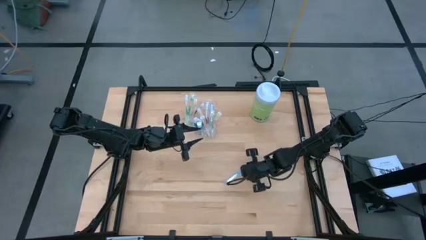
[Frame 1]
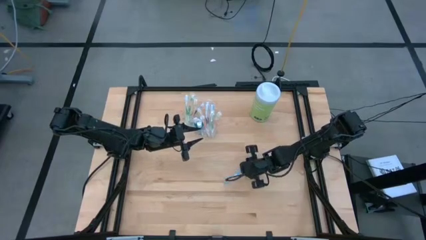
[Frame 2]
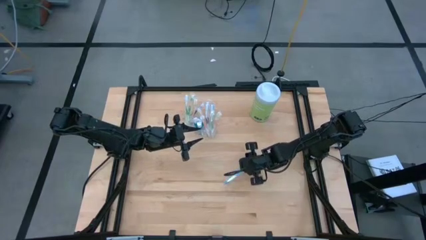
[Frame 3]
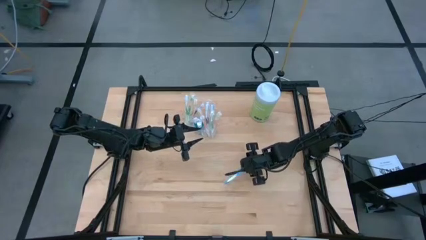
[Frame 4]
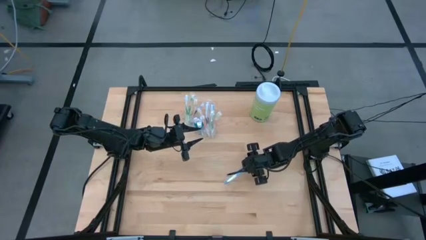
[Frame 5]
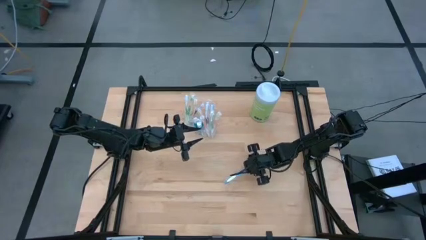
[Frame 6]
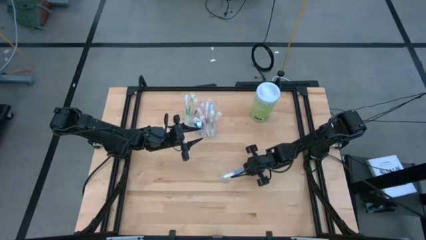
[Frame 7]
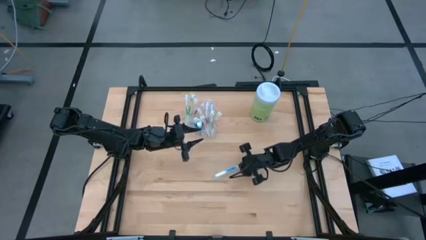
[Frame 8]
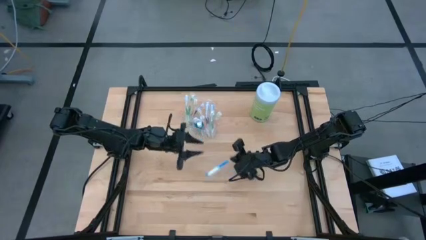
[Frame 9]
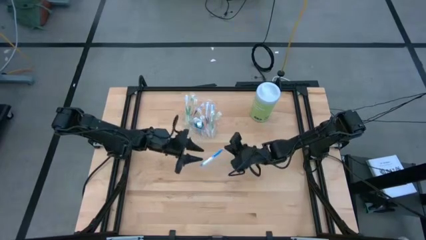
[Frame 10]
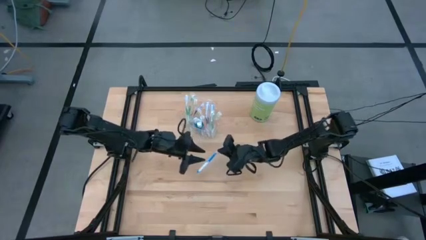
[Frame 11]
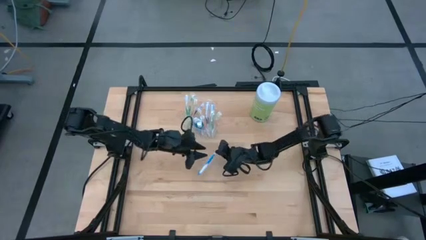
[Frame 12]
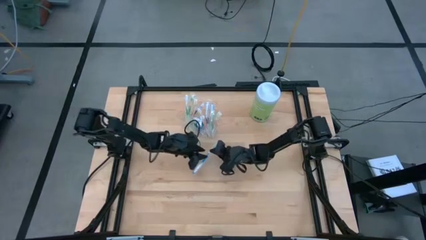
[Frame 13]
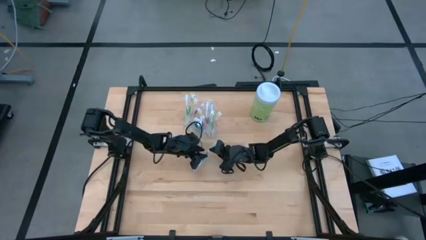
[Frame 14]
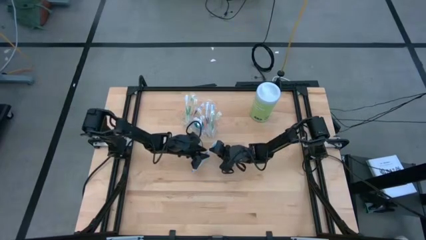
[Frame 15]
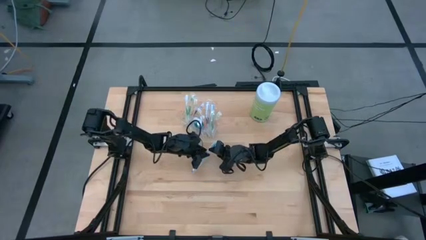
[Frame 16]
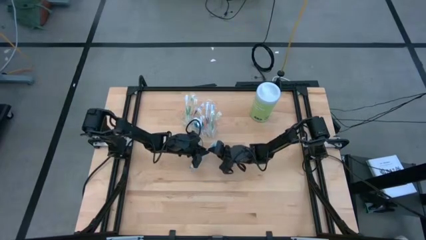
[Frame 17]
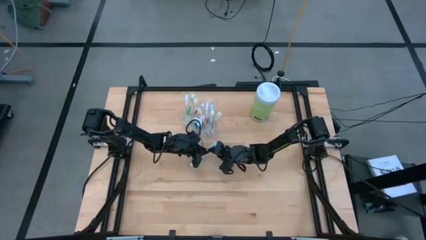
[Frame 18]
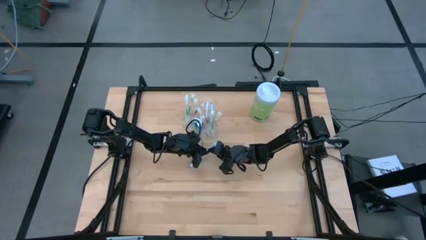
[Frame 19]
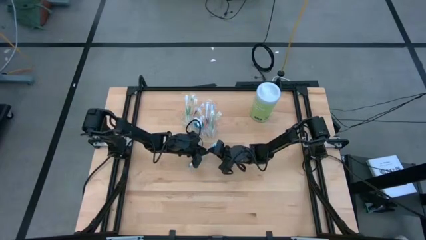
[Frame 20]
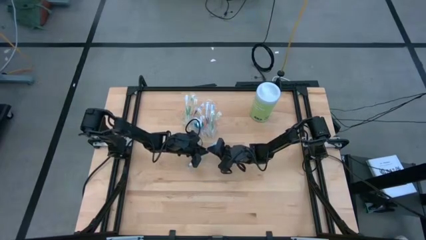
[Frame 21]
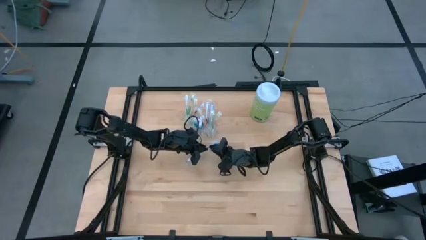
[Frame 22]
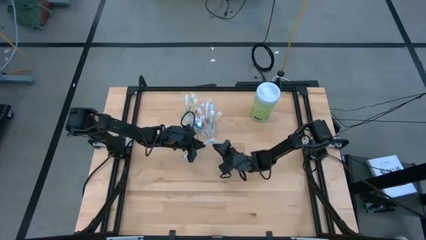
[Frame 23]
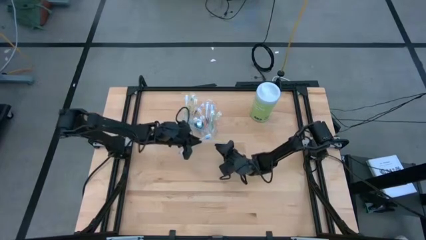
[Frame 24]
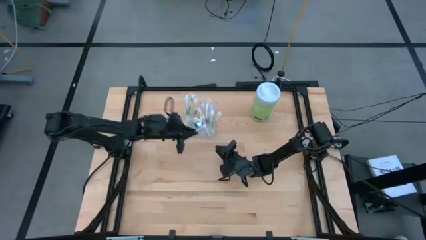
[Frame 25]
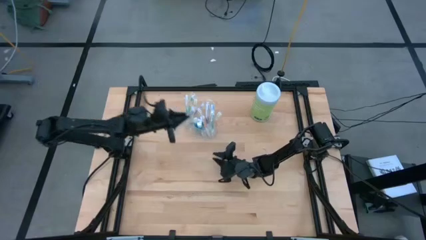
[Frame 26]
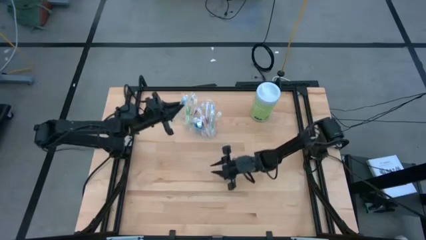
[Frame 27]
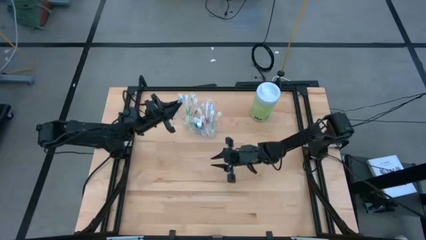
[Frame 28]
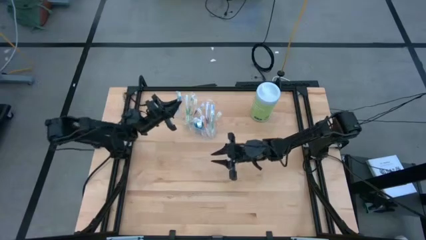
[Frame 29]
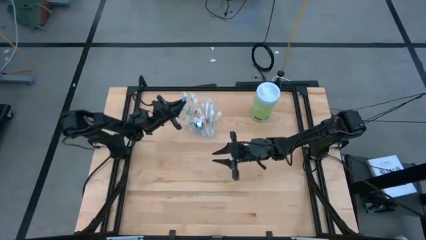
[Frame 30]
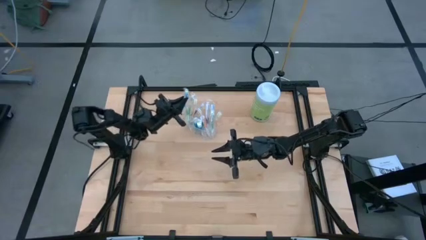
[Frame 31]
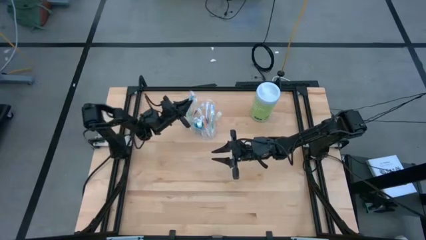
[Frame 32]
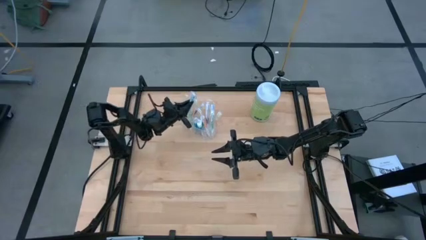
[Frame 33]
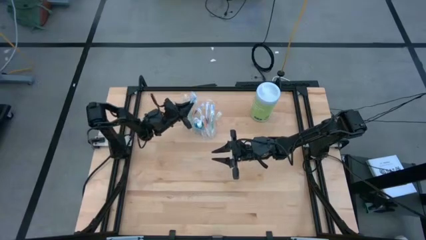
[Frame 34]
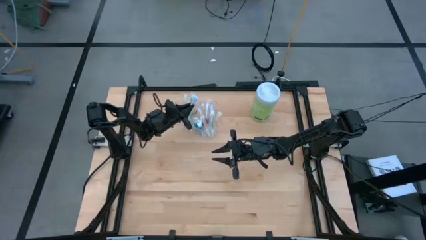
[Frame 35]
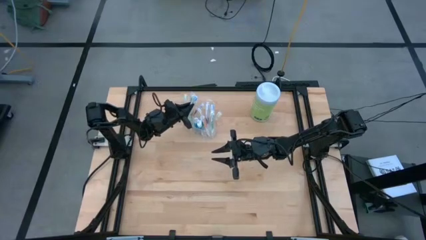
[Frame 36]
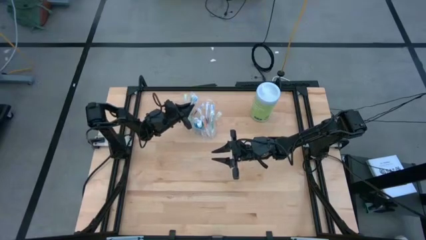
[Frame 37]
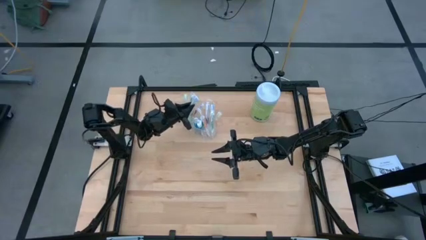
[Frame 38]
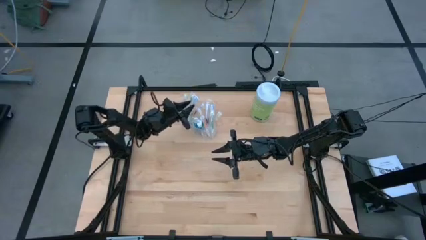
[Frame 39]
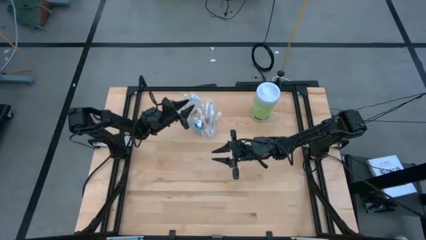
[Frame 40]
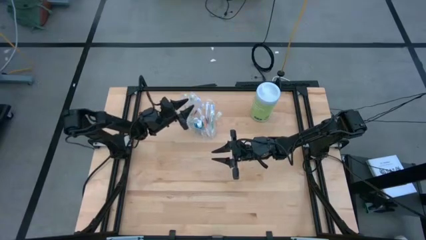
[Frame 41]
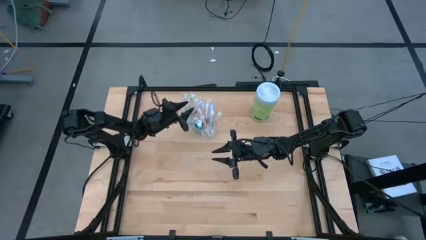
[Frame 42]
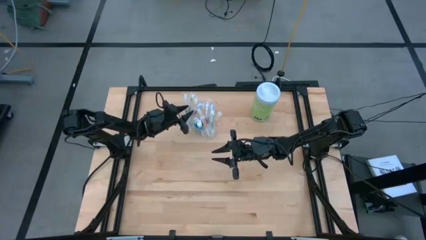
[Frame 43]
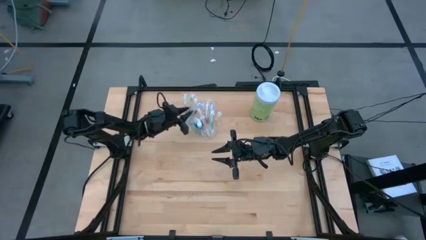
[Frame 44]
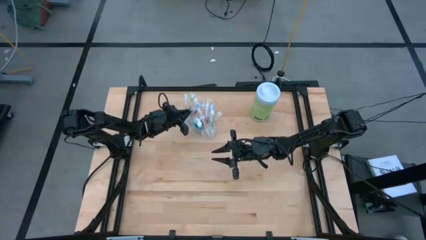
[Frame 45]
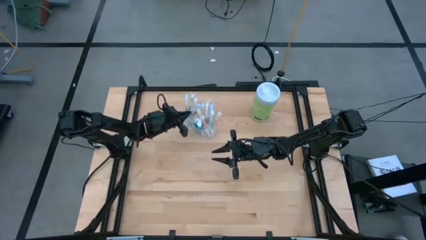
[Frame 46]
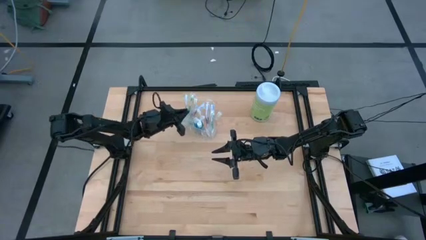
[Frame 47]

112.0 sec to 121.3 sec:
Task: Pick & Place toothbrushing station
Put the blue toothbrush into the transparent organizer

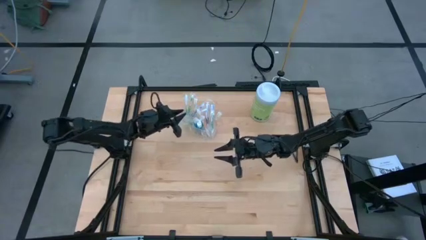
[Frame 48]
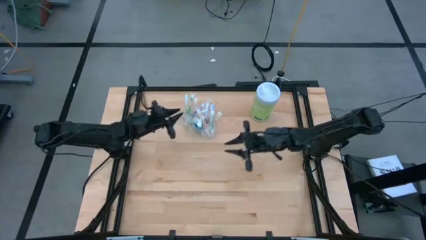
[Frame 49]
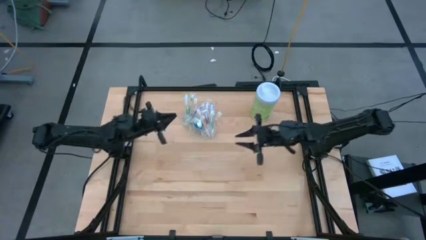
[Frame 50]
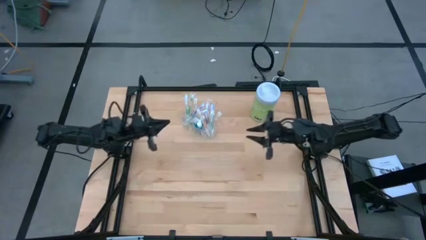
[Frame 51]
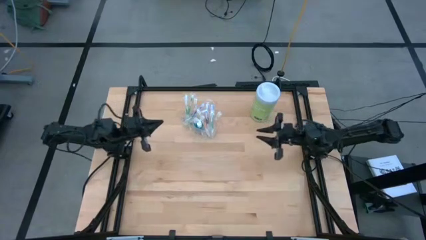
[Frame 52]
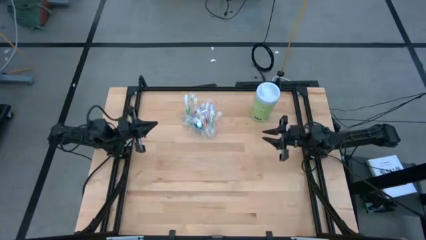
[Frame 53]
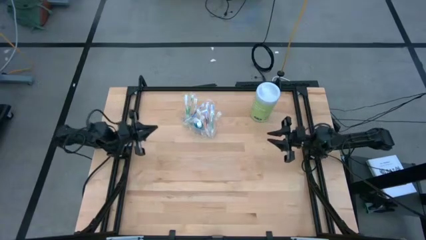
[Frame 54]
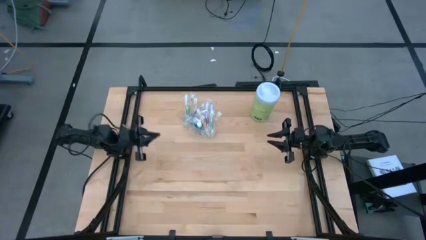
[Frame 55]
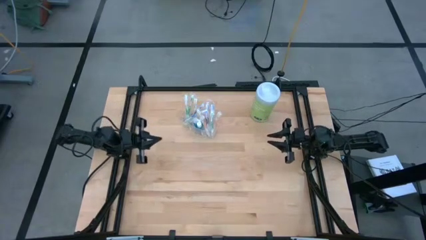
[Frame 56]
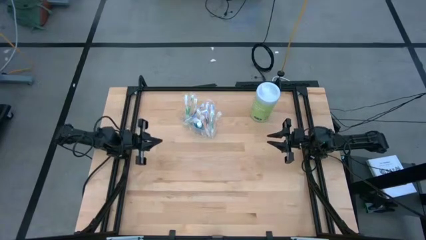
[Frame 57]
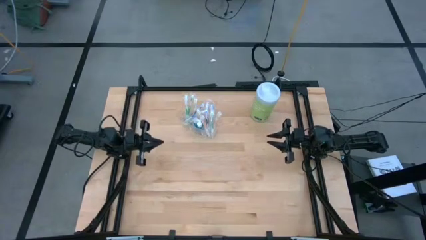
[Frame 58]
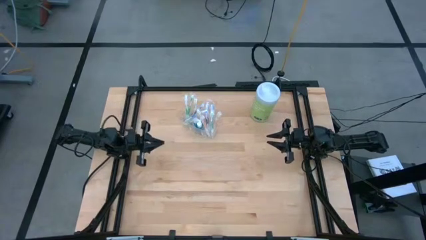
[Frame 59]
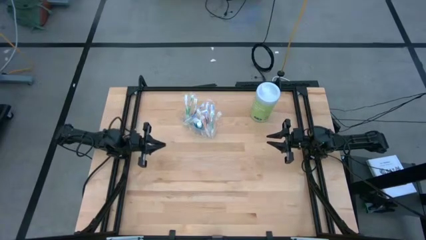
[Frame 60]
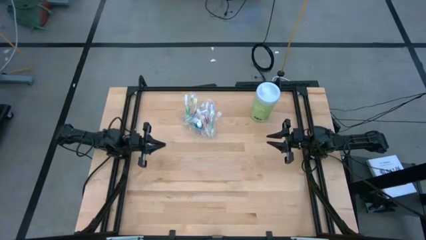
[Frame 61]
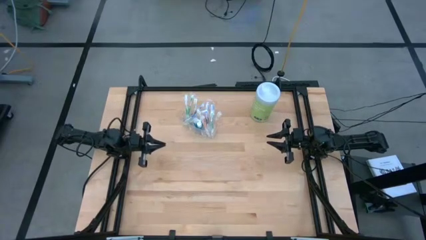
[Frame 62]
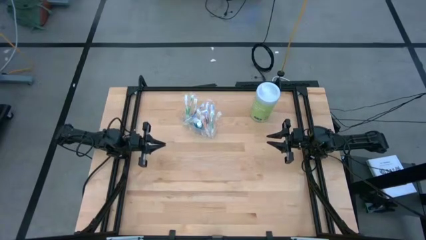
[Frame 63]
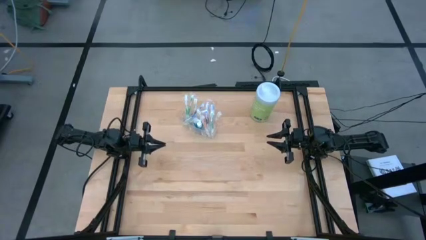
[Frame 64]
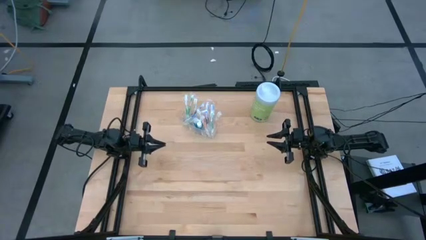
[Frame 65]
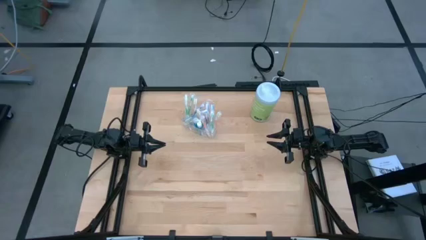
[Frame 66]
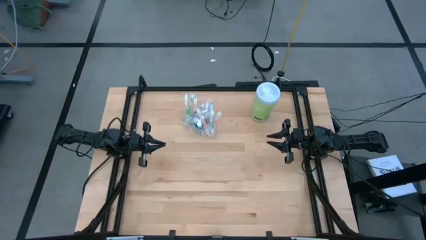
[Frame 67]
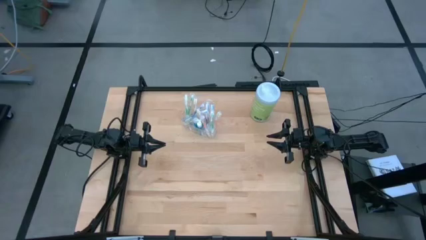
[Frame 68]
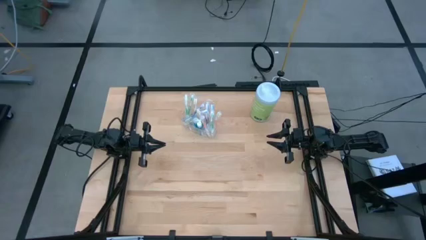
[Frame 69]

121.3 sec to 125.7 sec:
Return to Home Position

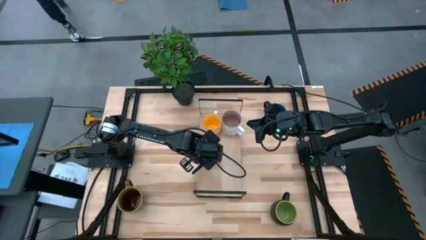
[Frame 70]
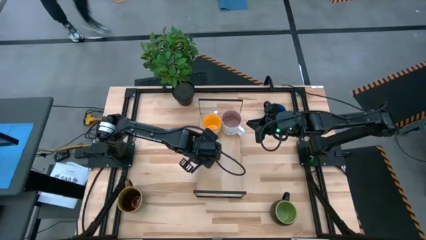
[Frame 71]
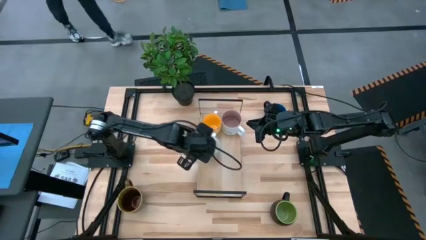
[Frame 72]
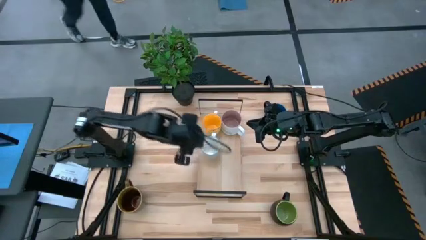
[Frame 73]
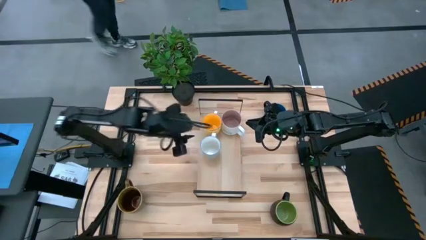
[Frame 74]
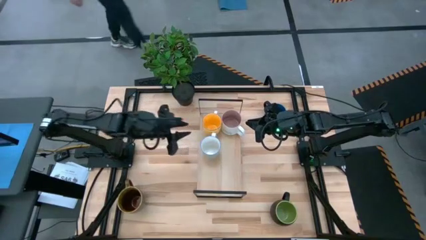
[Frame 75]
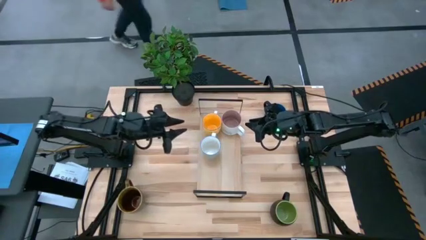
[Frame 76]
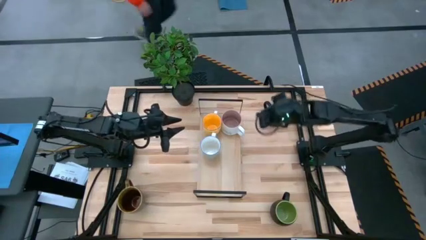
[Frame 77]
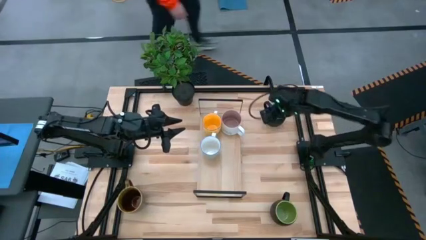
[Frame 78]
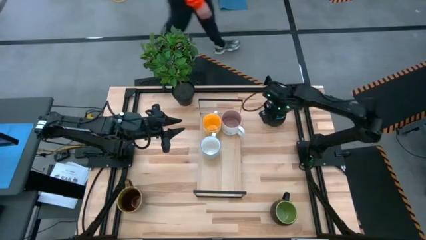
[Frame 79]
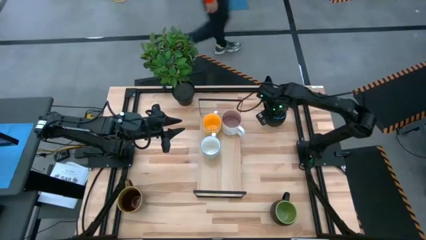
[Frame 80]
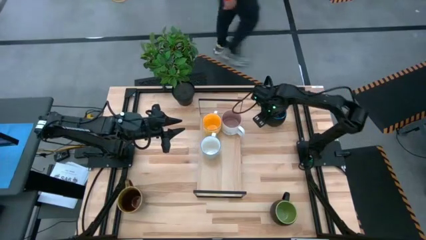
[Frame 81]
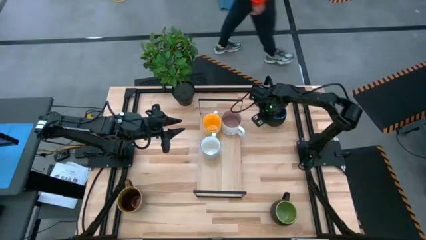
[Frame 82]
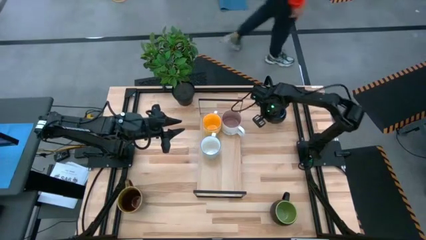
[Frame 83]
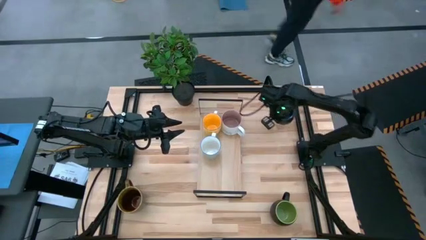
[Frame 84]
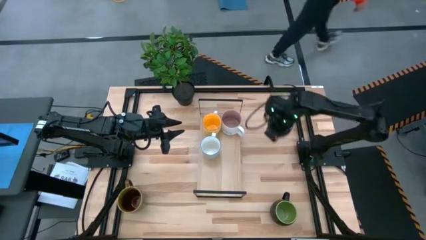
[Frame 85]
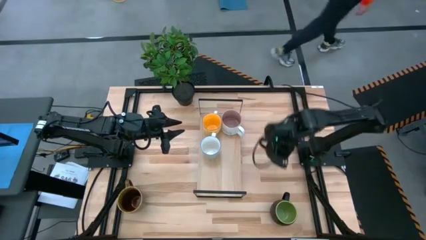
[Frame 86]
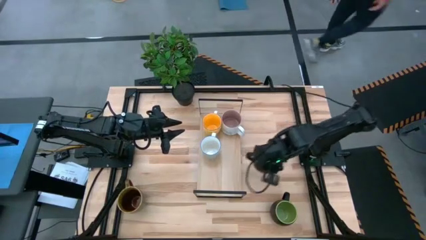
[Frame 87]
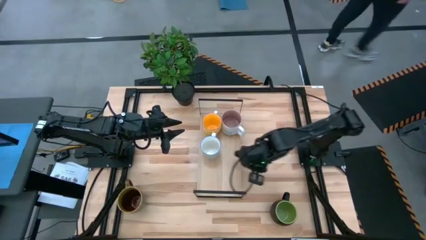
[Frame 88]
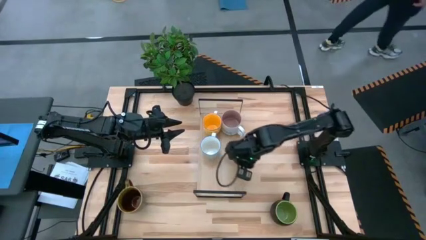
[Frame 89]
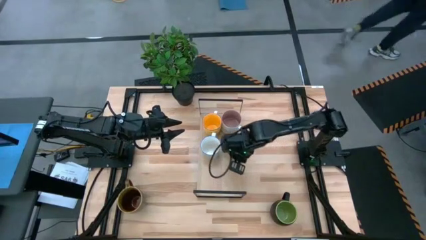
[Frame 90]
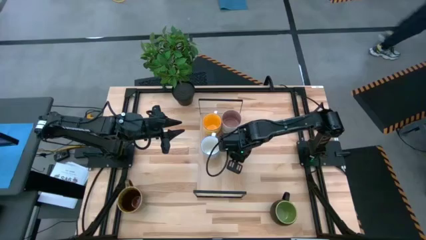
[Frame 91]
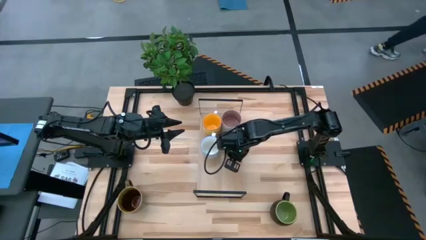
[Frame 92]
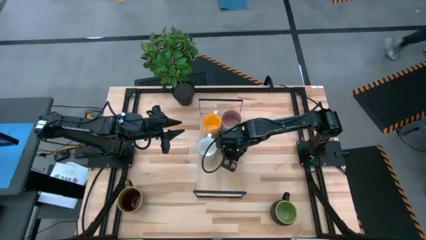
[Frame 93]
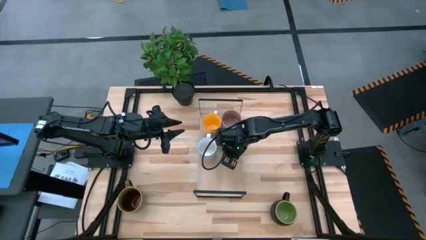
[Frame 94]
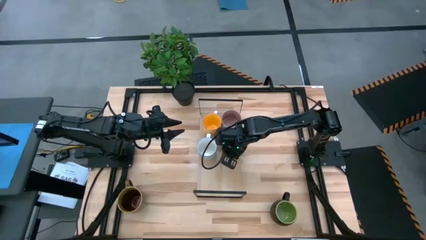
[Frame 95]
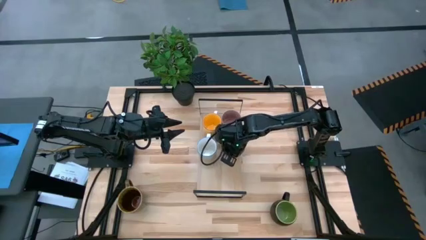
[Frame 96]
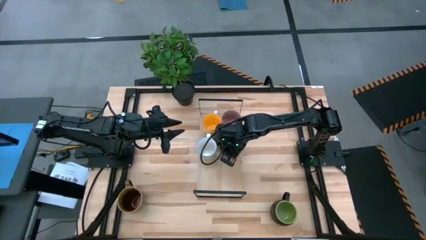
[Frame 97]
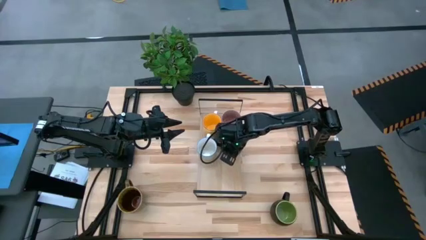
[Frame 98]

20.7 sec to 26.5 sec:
Task: Place coffee mugs
Put the black blue mug on the shelf
